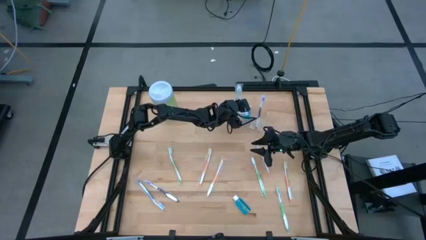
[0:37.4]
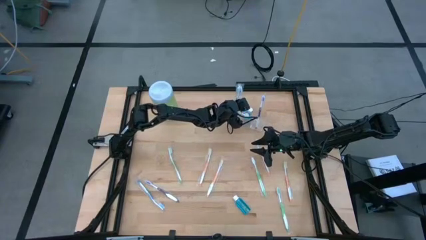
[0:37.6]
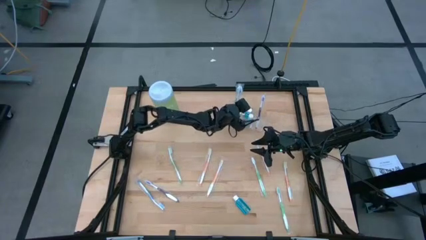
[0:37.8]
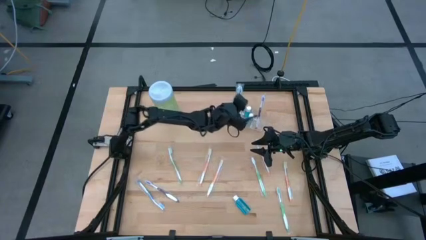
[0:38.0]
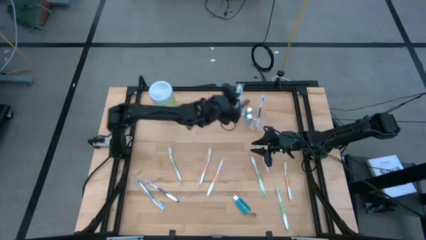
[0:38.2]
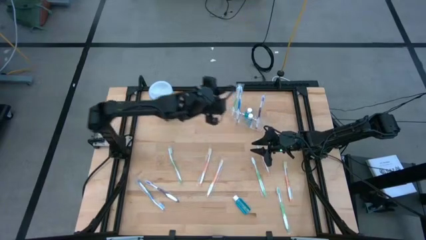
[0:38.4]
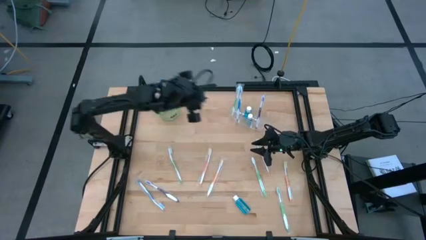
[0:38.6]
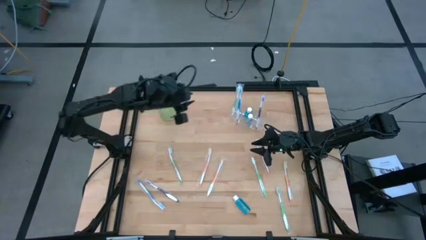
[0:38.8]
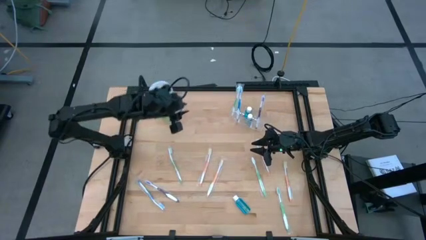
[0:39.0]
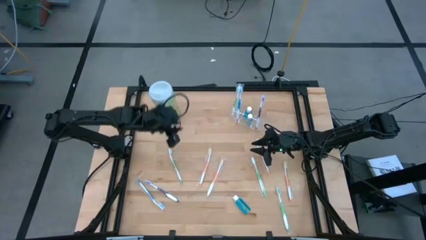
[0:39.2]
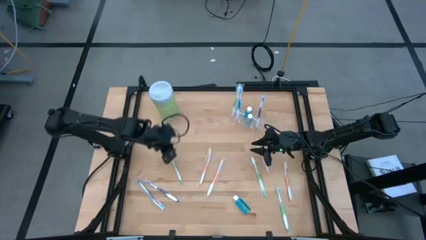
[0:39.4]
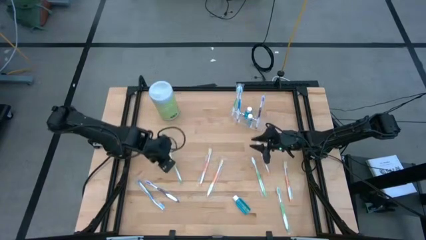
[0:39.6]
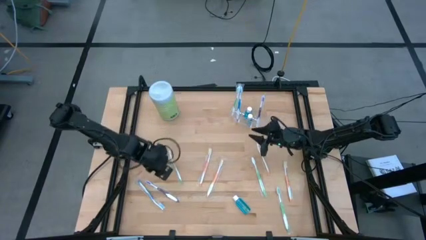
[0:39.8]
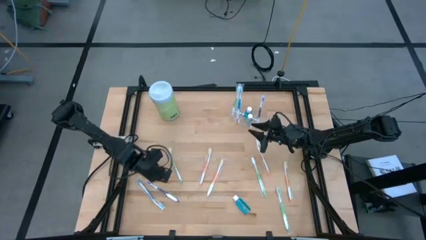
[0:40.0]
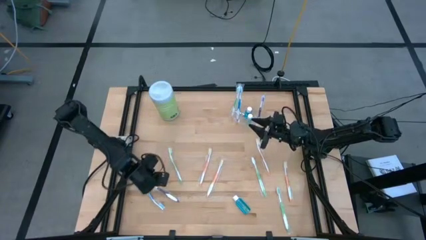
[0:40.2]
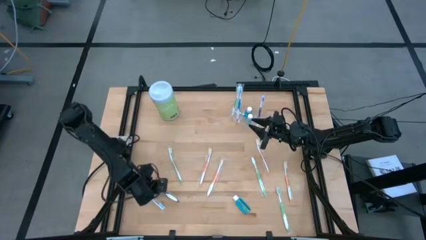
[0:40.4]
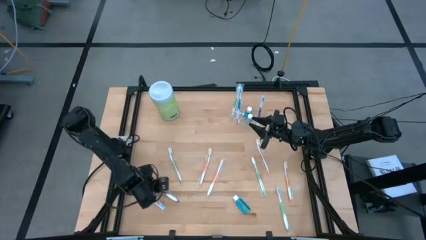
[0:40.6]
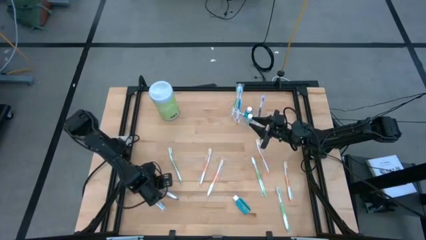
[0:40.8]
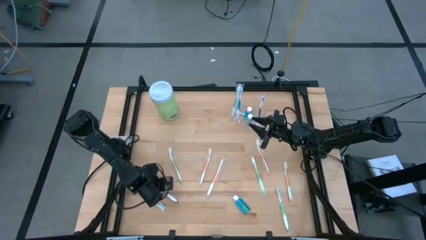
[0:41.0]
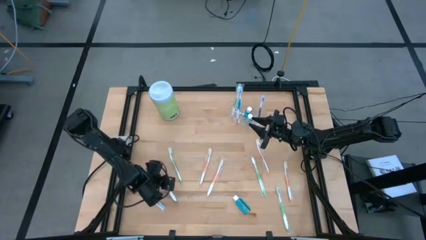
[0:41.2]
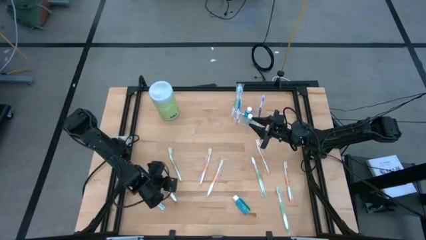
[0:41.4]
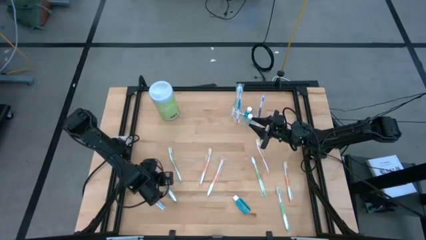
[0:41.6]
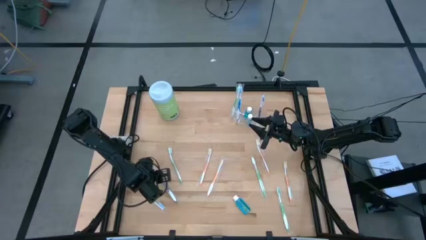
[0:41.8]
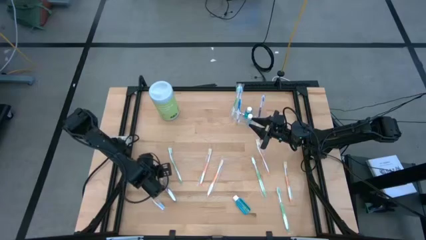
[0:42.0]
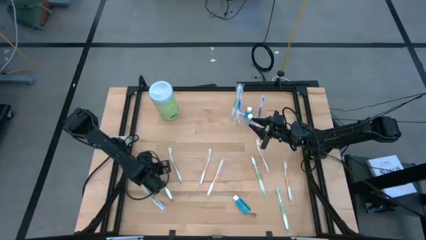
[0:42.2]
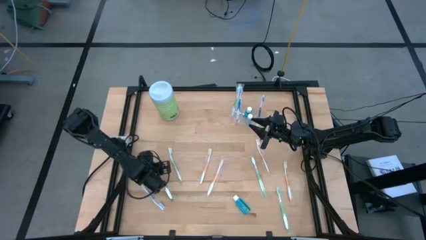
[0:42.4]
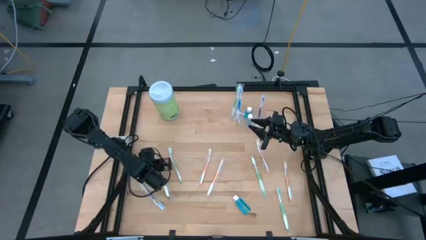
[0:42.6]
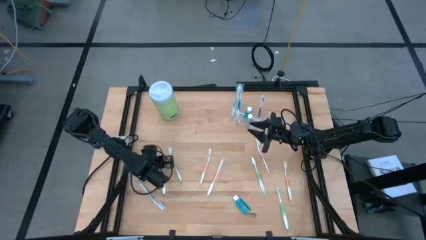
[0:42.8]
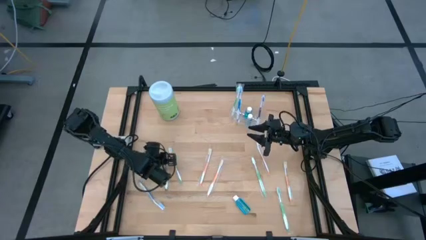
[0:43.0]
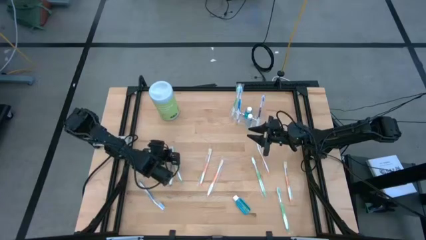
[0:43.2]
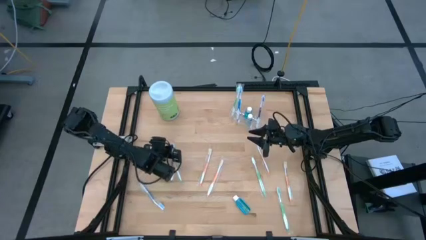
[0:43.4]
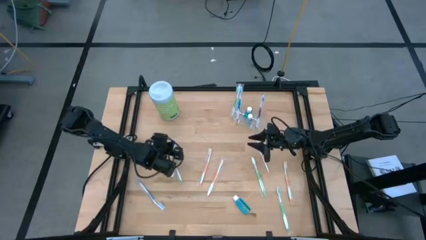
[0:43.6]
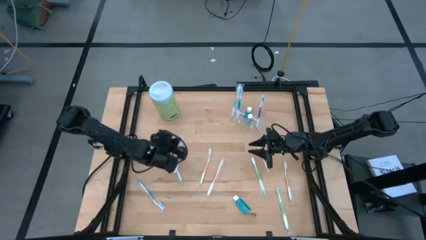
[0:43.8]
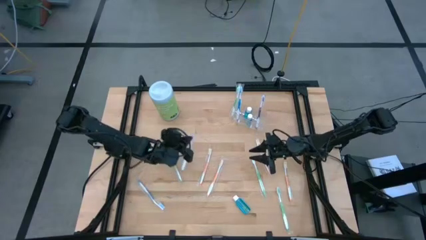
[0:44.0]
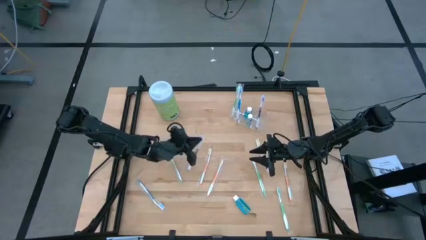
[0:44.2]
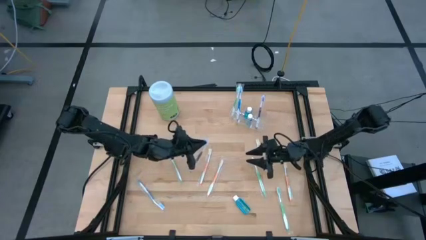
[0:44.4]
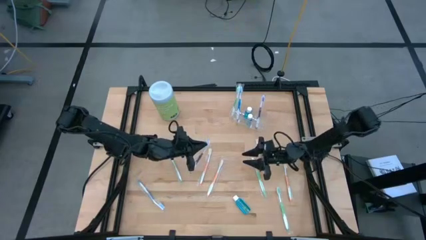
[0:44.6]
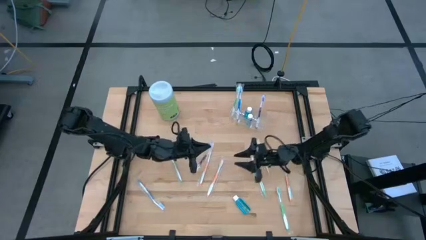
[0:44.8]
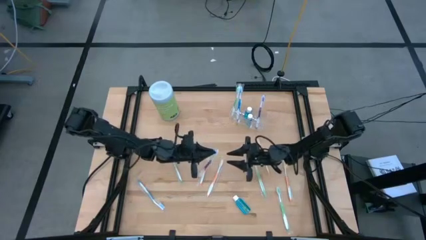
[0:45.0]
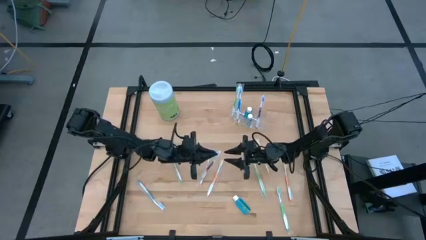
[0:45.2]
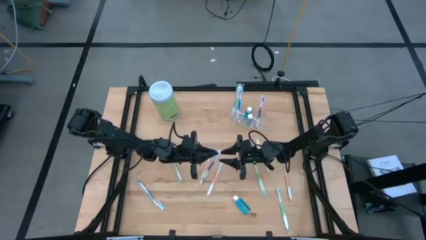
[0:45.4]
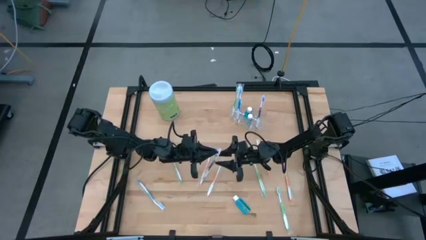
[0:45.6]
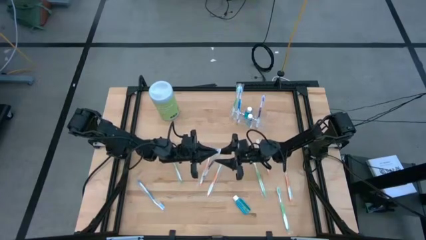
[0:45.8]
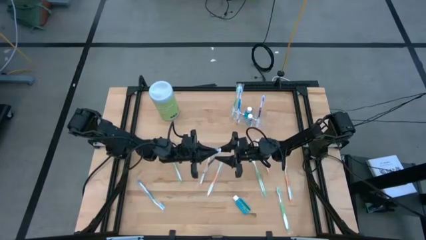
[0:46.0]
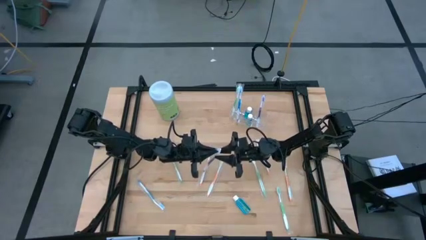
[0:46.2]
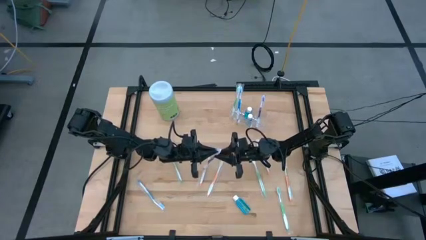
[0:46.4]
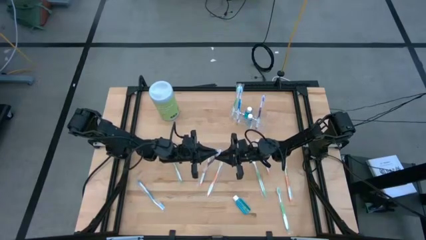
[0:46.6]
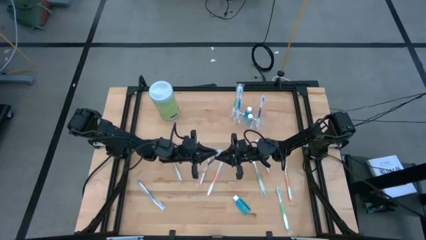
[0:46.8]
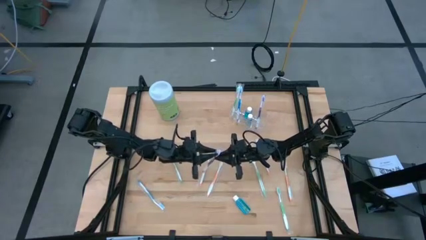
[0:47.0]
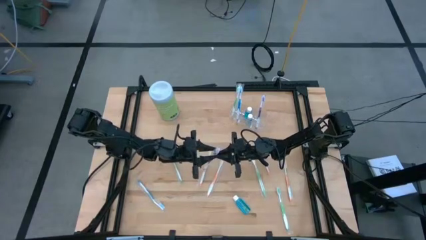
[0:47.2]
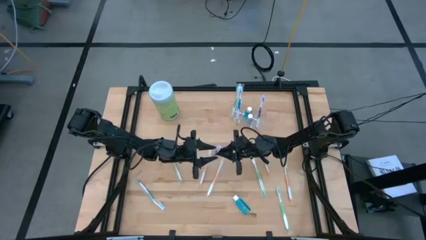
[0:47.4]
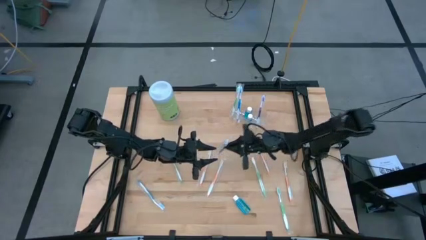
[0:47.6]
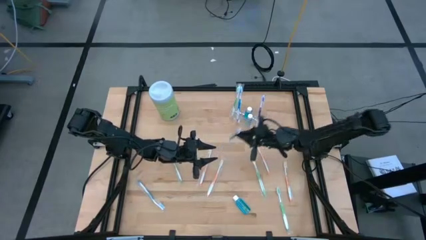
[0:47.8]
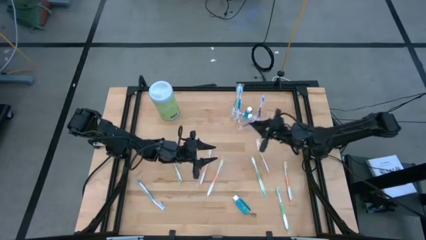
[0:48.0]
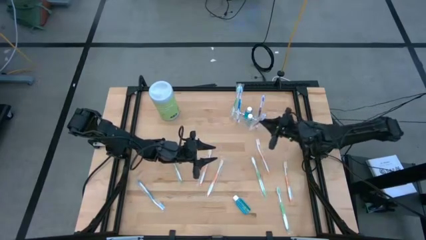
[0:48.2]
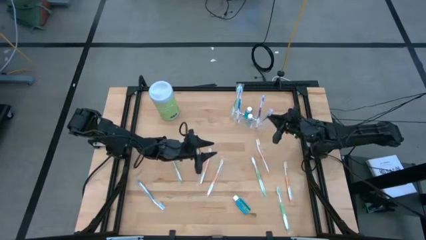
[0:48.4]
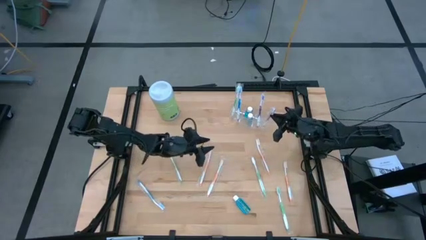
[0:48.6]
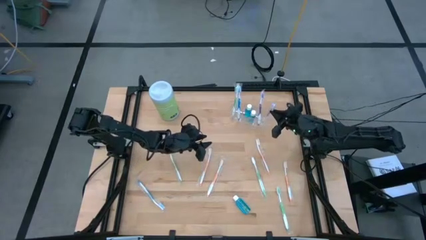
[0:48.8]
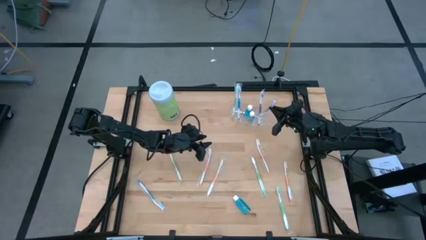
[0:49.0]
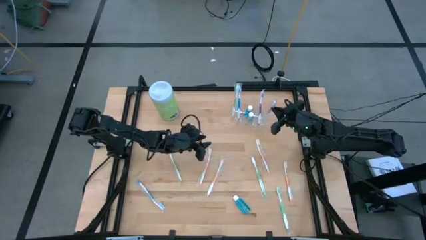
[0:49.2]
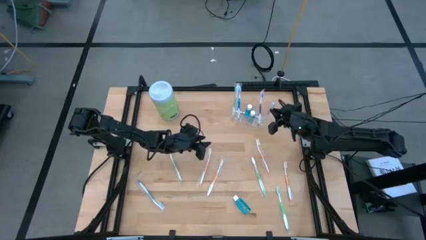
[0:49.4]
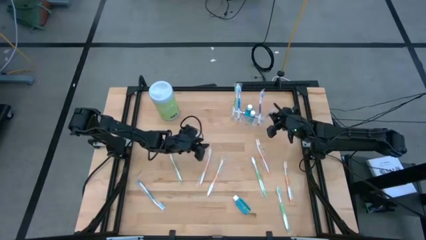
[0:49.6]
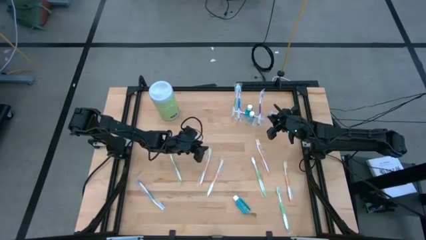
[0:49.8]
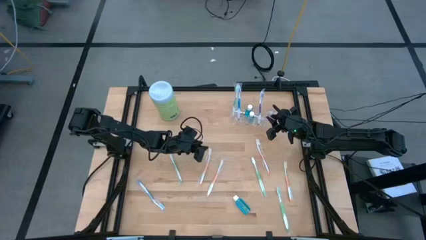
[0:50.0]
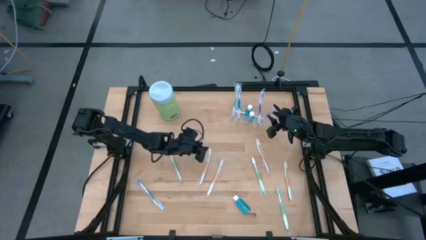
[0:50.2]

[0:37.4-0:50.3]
Task: Pick & Place toothbrushing station
Put the purple toothbrush into the transparent organizer

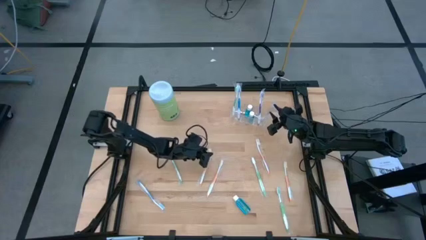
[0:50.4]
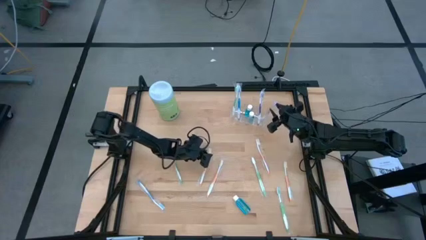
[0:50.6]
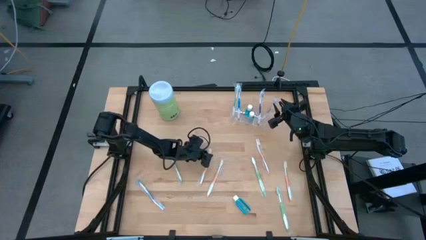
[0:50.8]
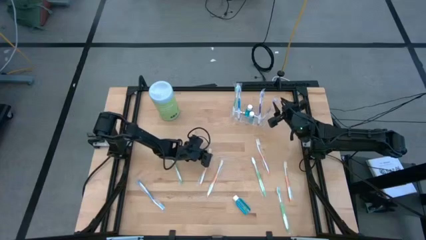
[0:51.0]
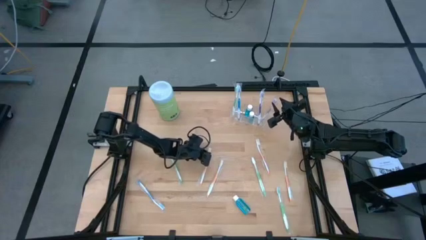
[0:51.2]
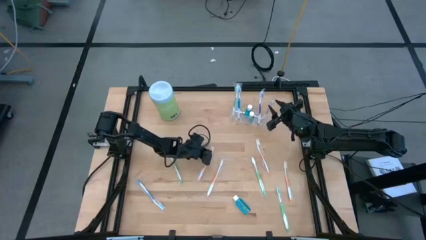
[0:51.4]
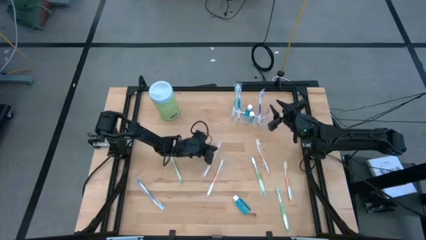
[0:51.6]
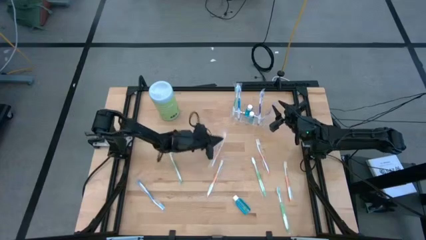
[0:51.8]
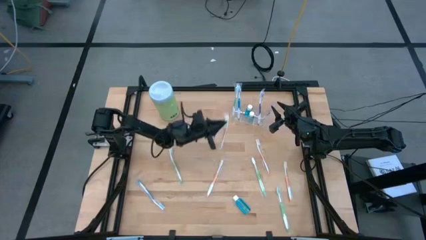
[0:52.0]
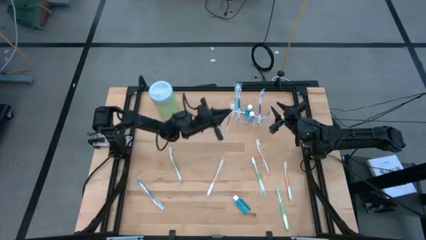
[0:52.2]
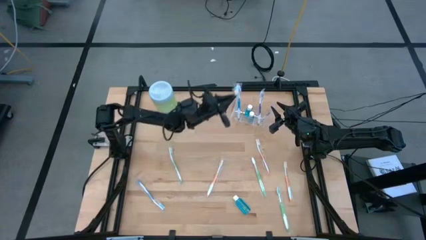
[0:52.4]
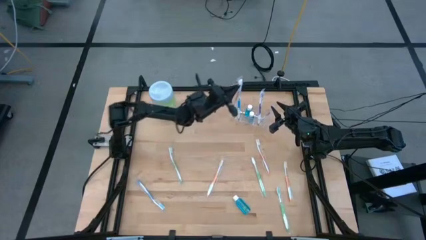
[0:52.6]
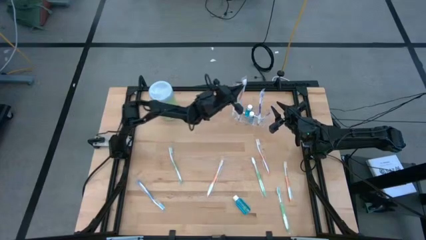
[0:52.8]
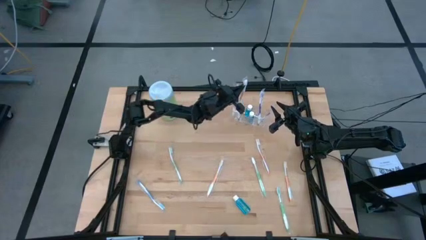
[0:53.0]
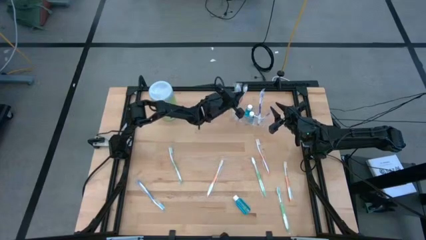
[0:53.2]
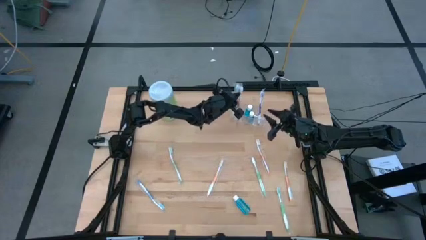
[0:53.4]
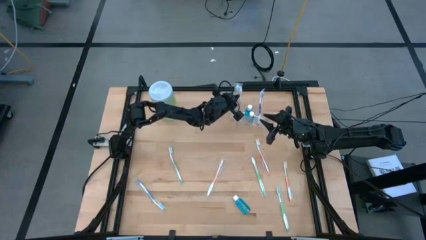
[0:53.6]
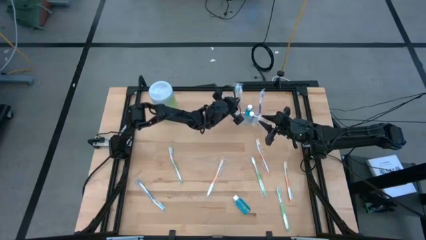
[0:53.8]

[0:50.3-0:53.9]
Put the orange toothbrush into the transparent organizer
